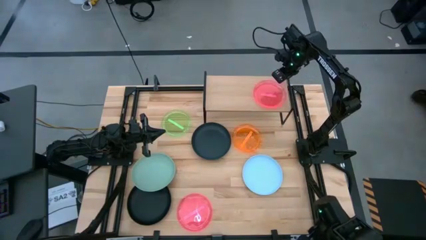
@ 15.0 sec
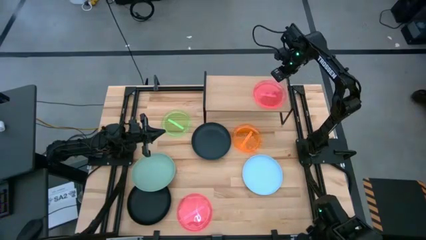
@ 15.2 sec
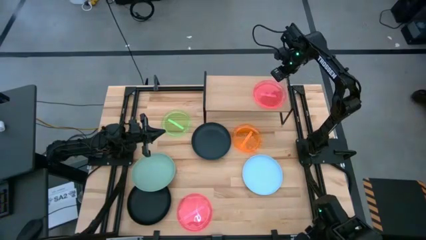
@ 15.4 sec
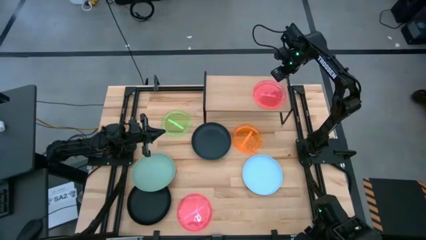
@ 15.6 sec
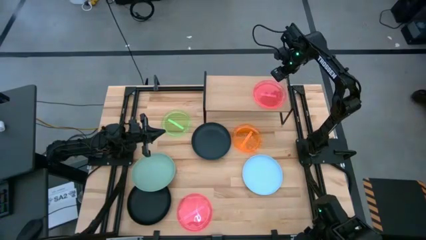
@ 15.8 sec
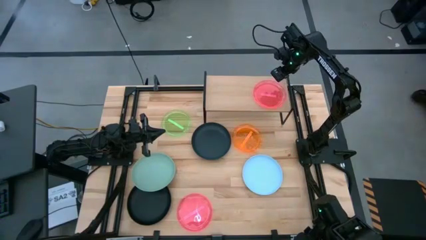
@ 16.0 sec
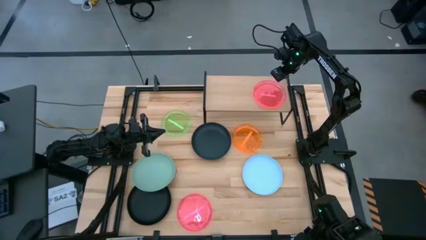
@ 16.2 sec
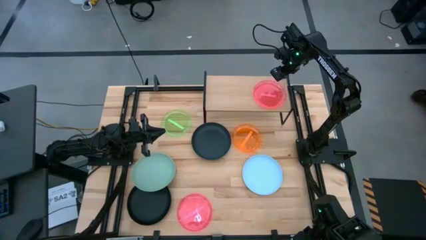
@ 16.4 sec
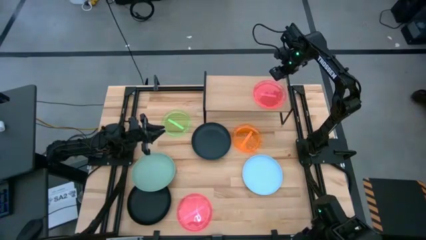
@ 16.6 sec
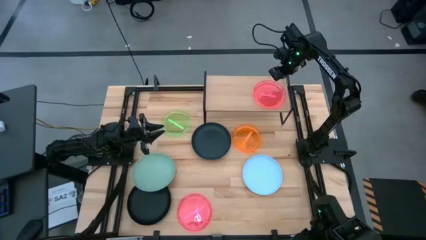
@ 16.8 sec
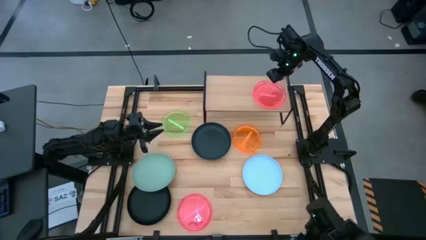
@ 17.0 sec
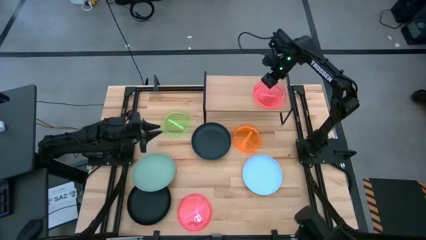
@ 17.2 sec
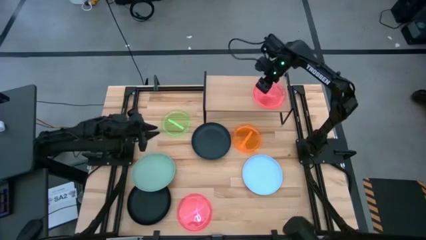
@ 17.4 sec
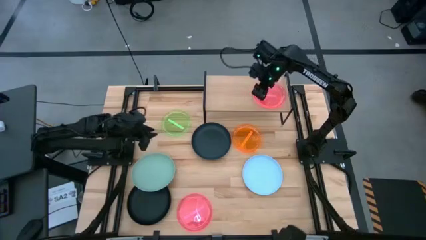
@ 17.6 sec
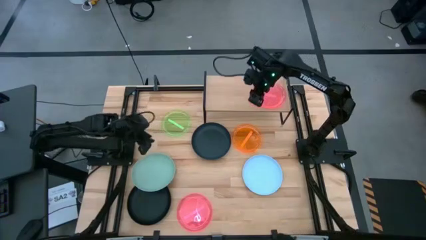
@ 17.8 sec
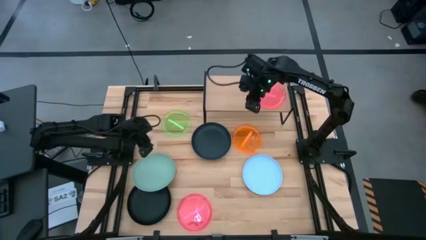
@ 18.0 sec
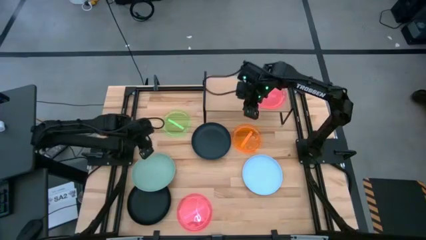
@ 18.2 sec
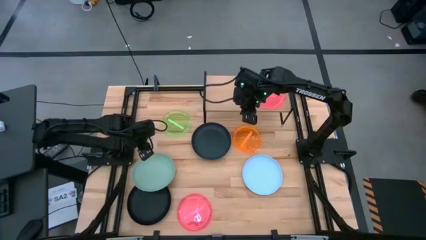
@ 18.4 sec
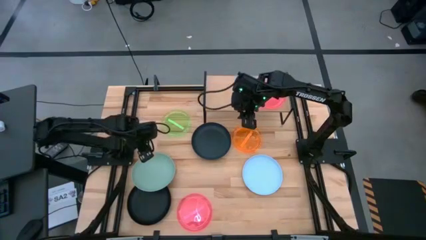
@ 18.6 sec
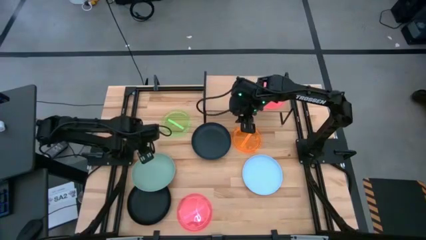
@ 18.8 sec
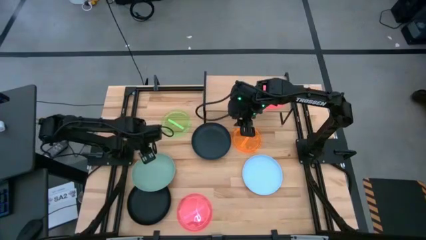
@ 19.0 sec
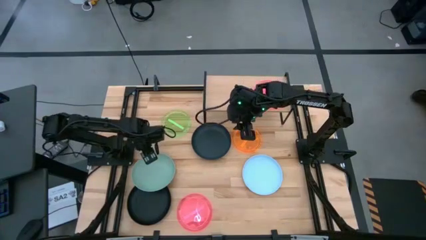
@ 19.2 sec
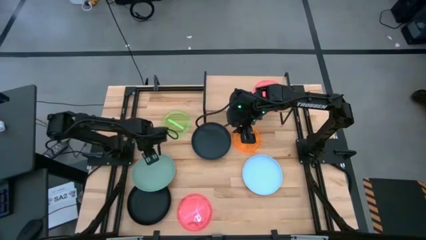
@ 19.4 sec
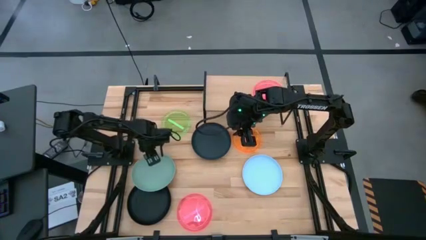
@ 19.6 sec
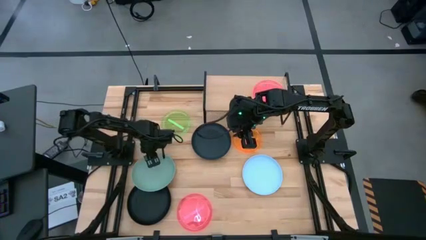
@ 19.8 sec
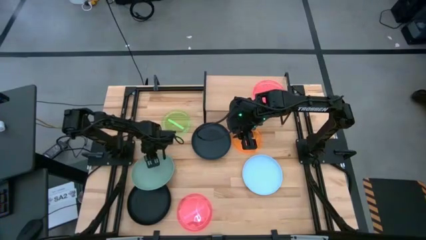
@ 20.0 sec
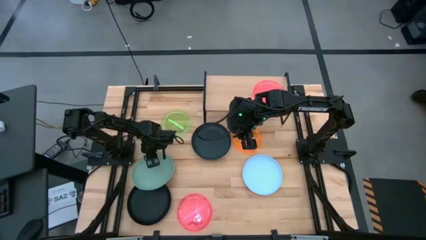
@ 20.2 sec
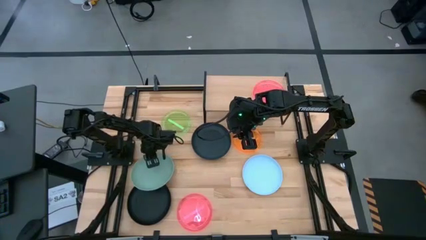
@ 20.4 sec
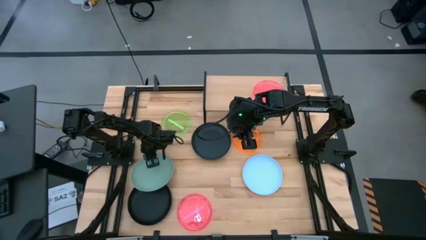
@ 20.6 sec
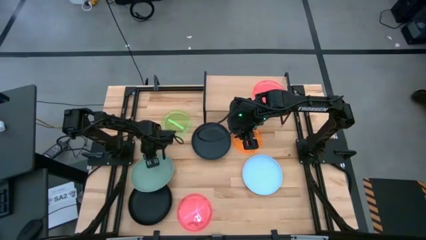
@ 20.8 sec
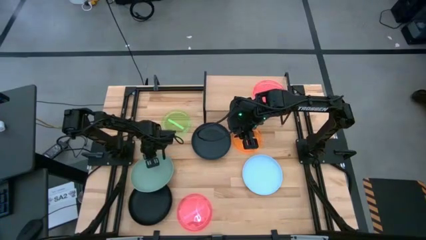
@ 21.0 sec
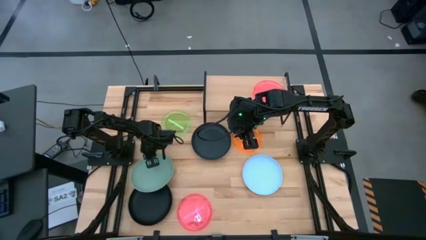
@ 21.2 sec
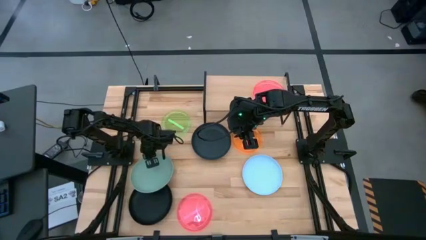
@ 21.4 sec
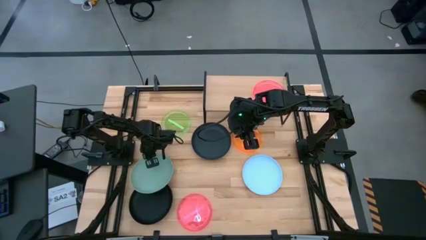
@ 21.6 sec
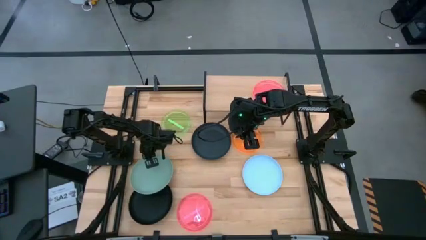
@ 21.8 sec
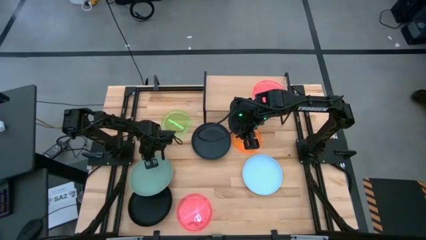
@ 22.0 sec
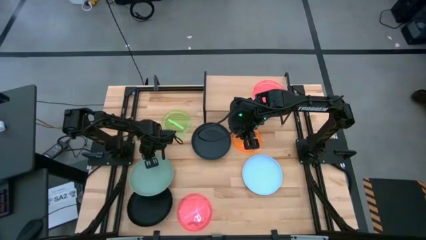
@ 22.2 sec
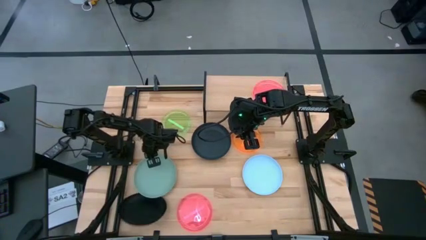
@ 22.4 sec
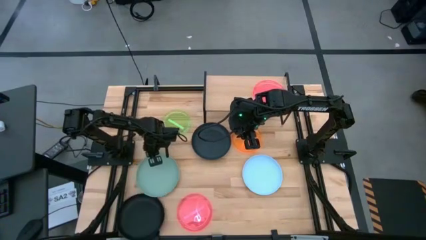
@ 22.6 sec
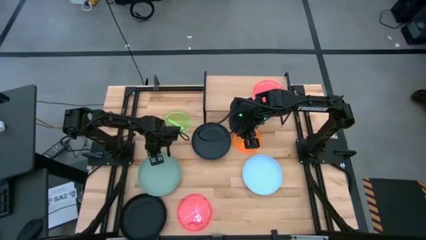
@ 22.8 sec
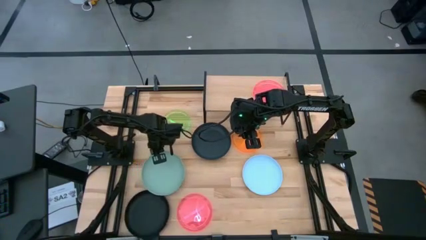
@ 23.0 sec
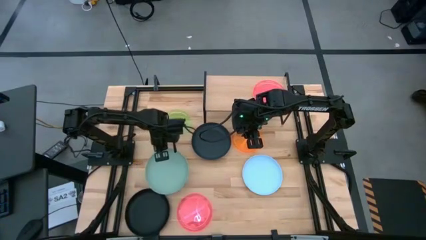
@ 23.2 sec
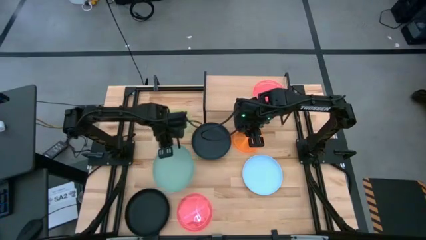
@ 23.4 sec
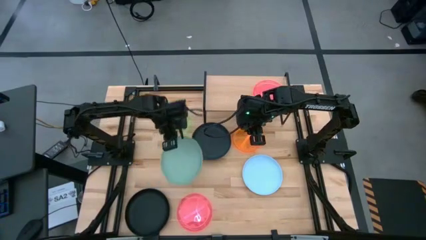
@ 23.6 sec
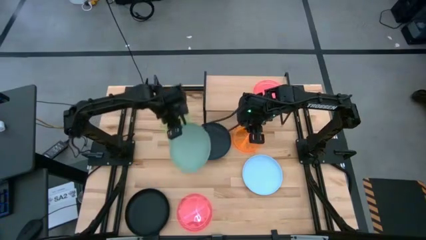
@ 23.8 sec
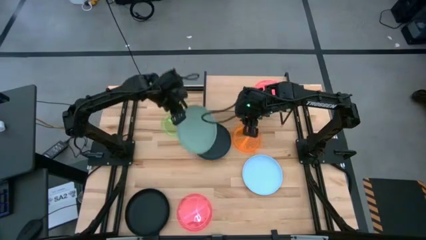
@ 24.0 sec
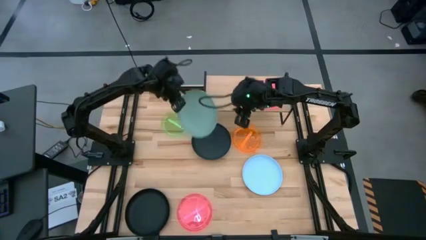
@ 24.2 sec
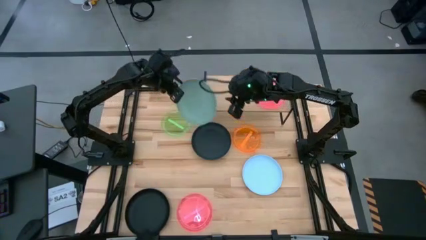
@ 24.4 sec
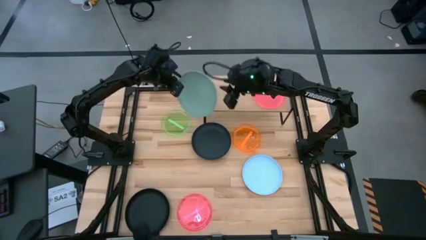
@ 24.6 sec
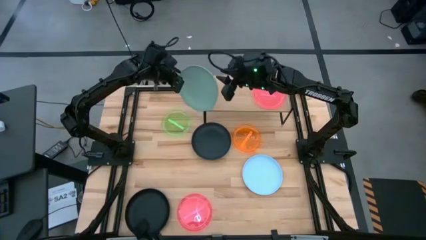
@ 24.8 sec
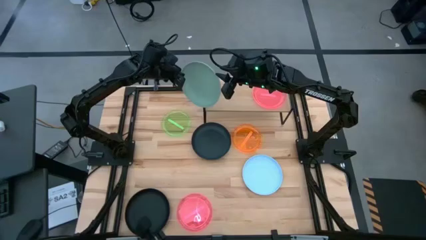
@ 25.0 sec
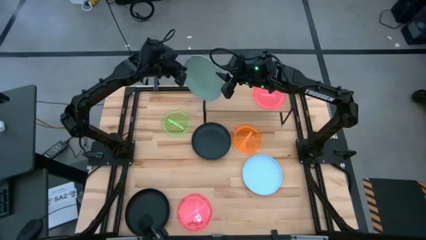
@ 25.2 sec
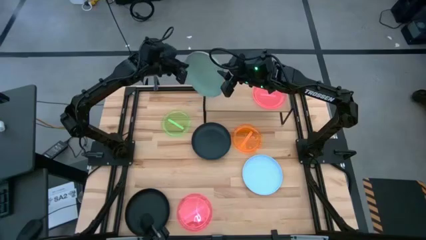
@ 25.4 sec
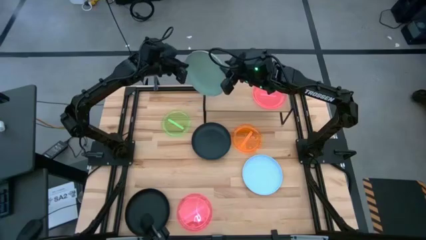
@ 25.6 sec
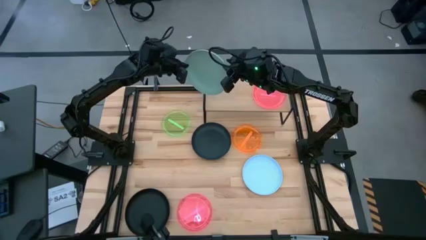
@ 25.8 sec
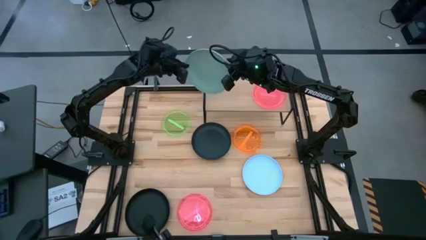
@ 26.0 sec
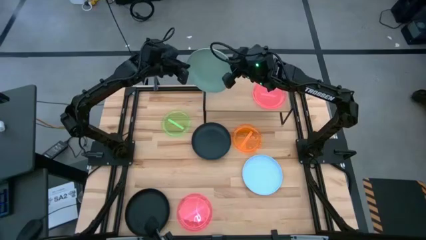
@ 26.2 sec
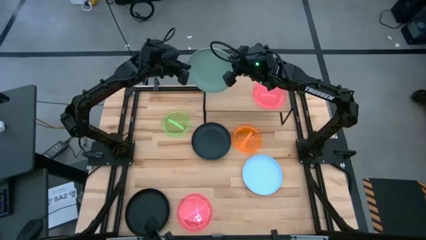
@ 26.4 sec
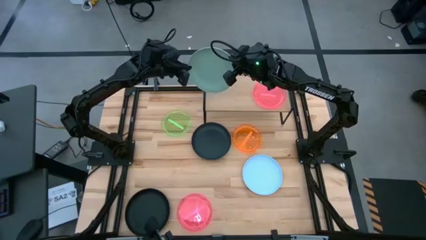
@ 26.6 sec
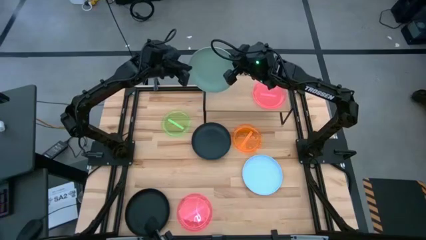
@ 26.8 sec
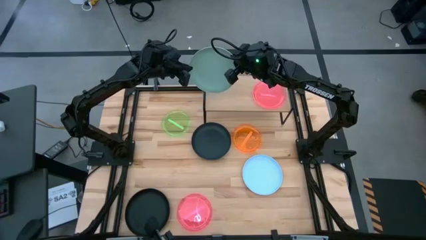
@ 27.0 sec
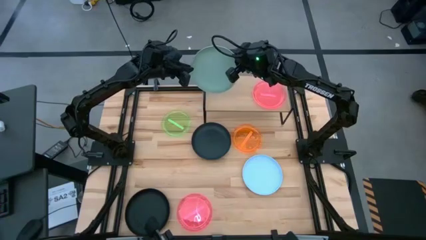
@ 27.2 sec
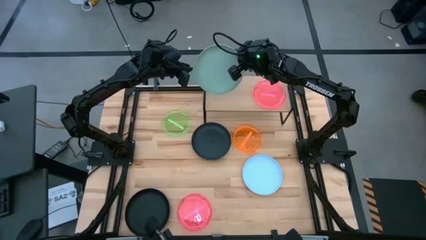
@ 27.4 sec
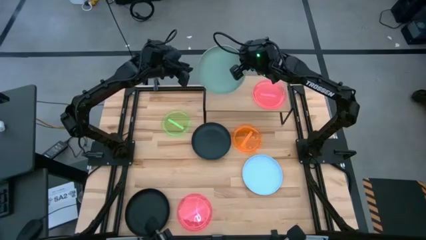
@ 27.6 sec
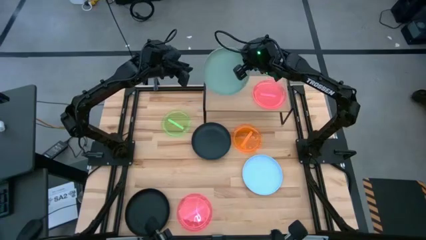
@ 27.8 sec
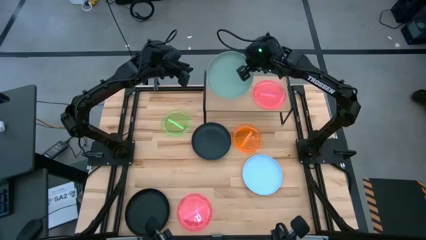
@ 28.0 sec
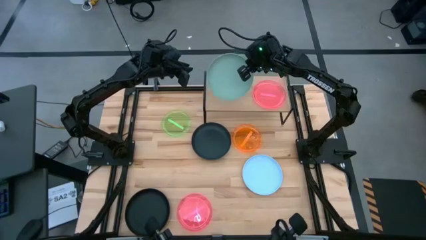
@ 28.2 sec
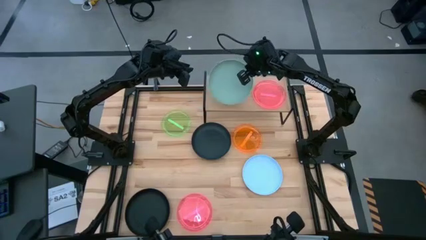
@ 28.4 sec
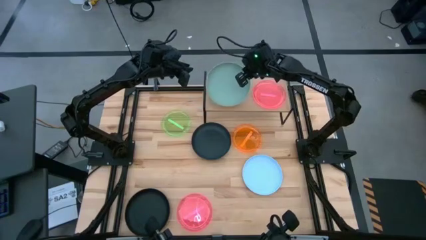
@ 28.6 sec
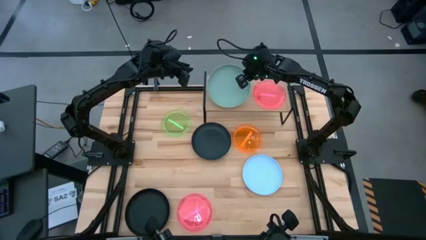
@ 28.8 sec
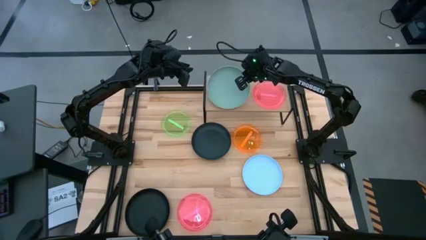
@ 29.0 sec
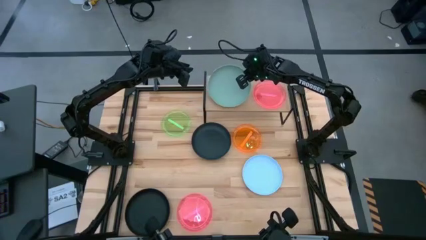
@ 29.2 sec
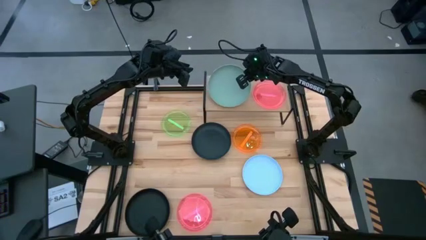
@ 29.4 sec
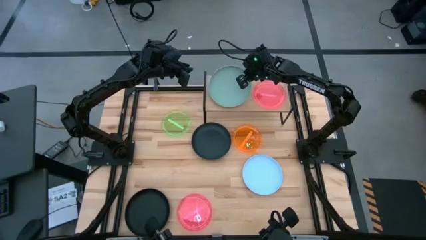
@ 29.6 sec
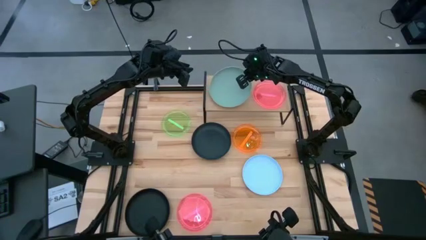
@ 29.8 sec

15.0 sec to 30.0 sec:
Task: Place and stack plates onto a shelf
Put the left blue plate on the shelf
